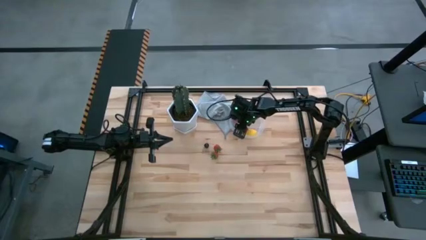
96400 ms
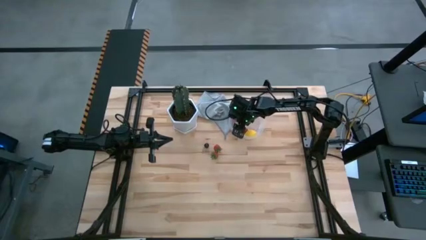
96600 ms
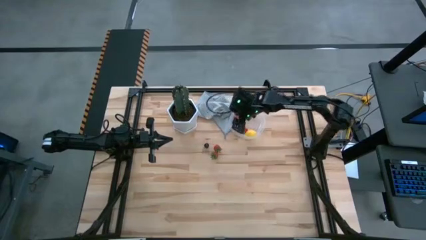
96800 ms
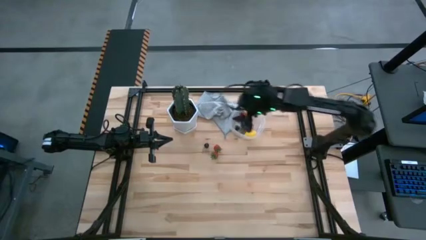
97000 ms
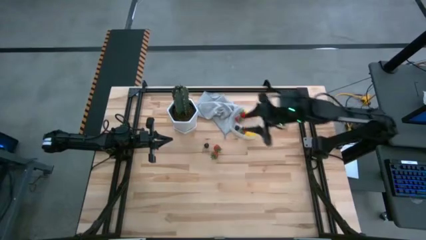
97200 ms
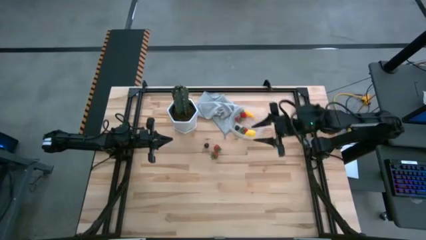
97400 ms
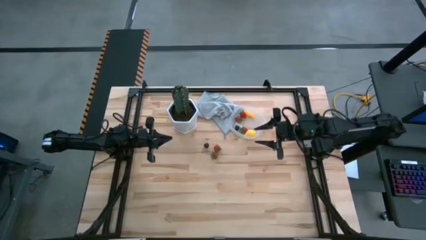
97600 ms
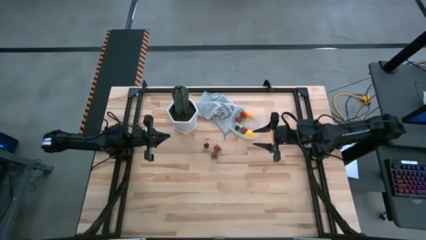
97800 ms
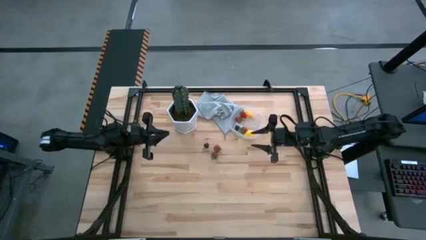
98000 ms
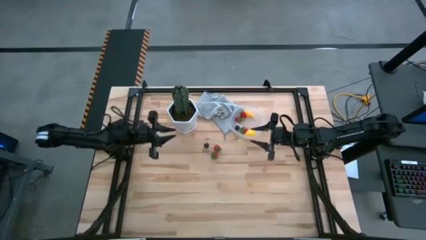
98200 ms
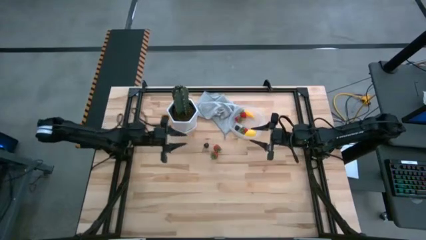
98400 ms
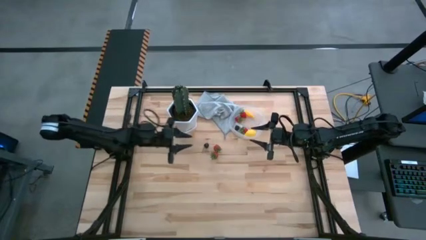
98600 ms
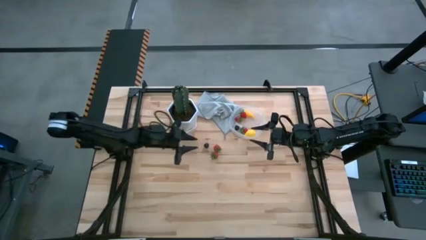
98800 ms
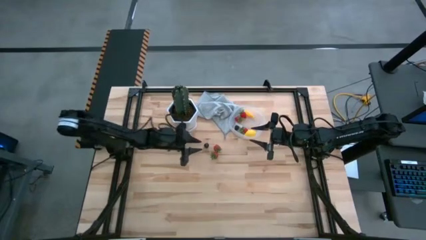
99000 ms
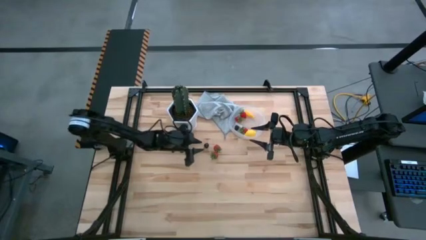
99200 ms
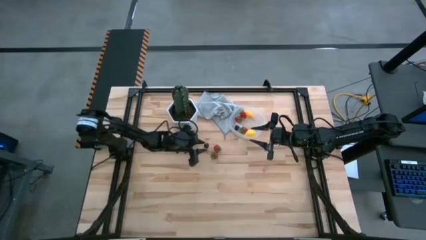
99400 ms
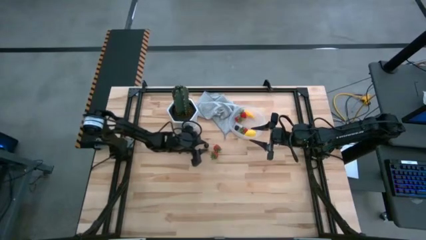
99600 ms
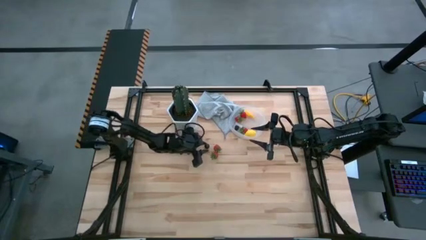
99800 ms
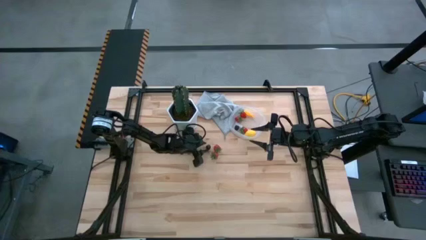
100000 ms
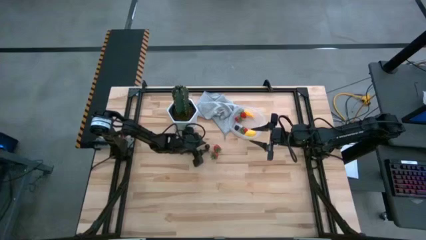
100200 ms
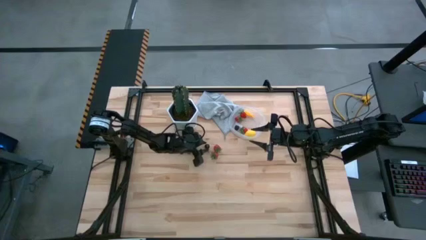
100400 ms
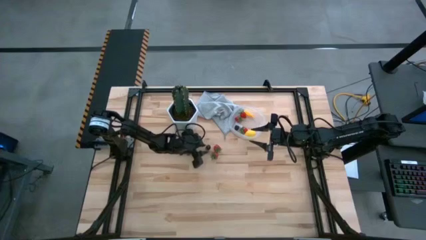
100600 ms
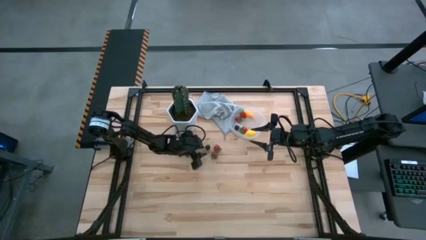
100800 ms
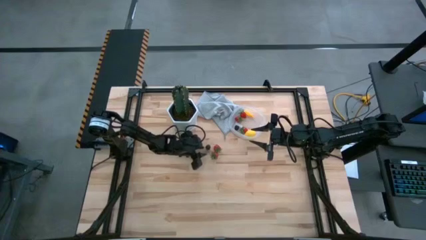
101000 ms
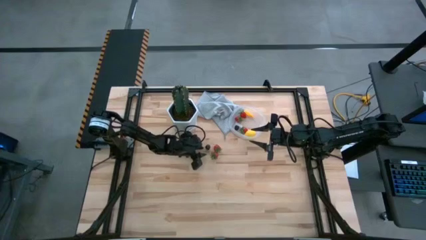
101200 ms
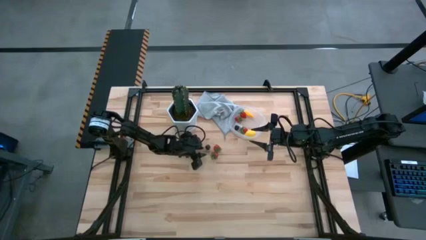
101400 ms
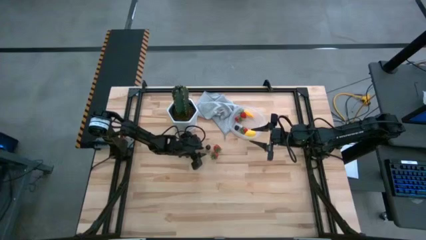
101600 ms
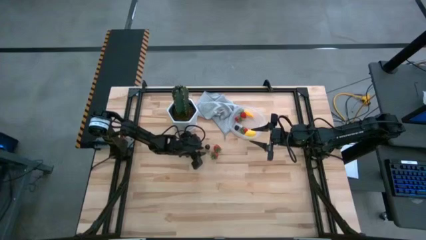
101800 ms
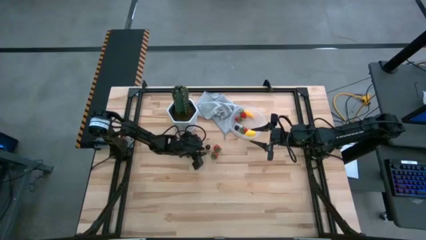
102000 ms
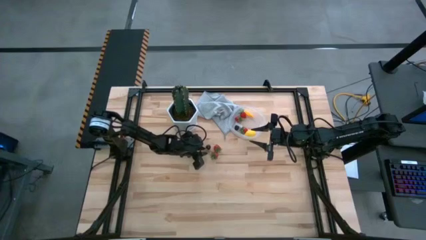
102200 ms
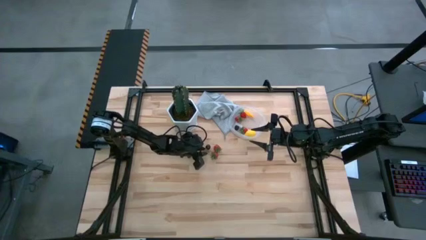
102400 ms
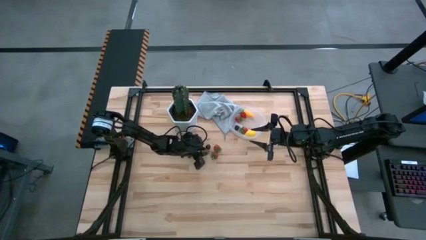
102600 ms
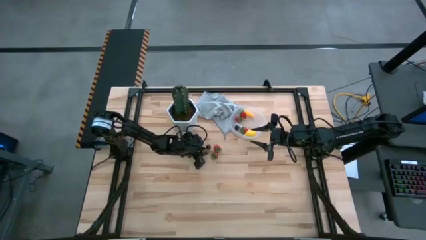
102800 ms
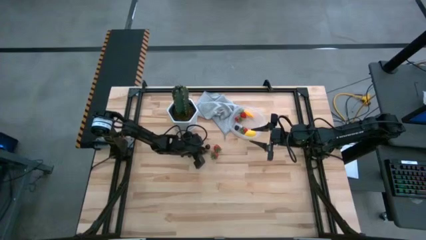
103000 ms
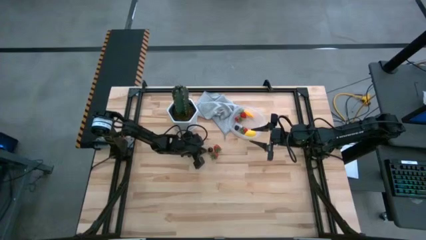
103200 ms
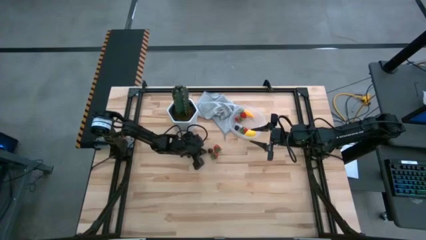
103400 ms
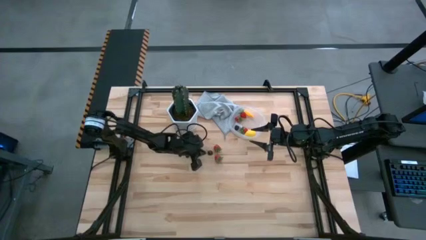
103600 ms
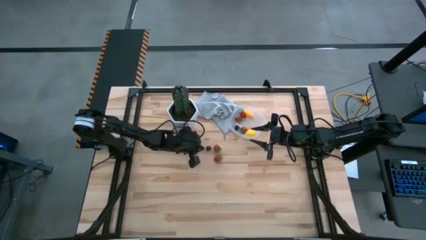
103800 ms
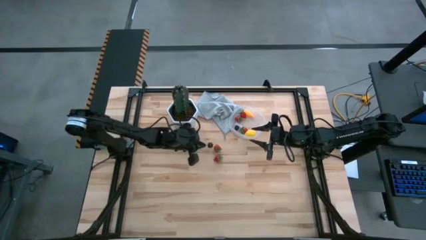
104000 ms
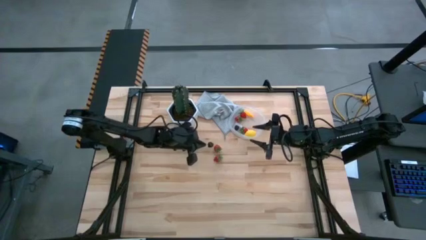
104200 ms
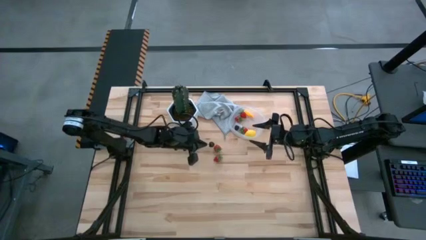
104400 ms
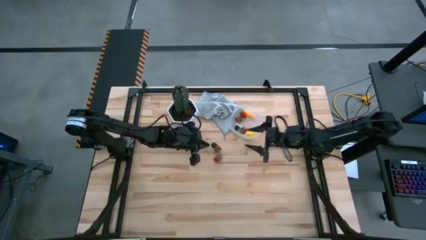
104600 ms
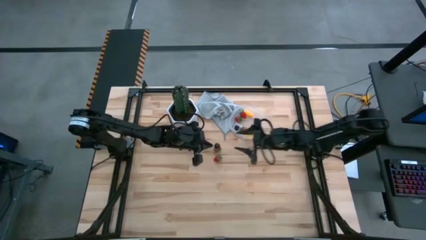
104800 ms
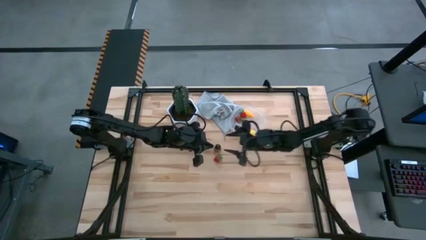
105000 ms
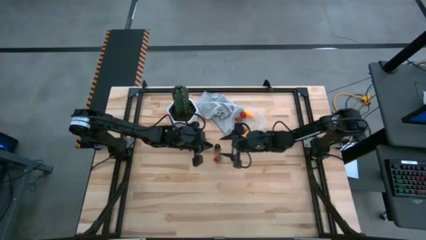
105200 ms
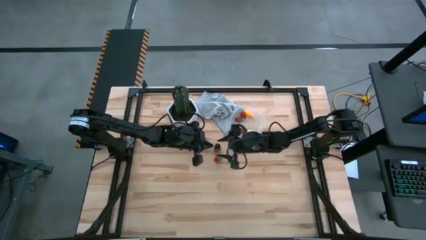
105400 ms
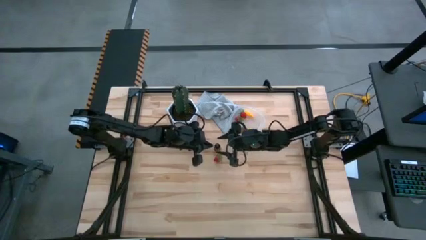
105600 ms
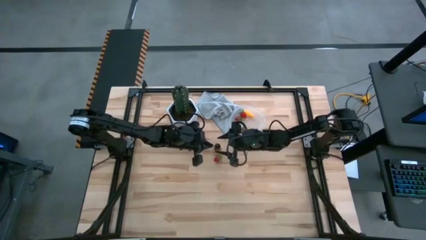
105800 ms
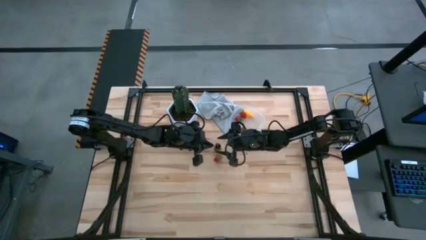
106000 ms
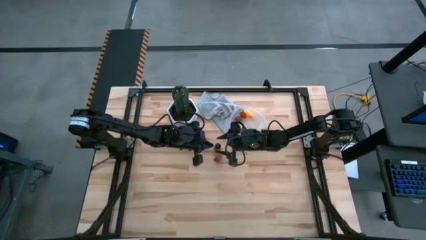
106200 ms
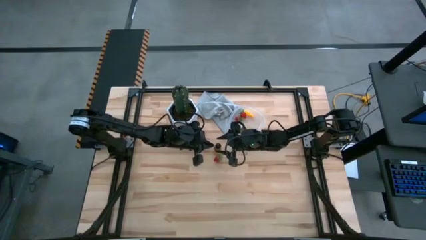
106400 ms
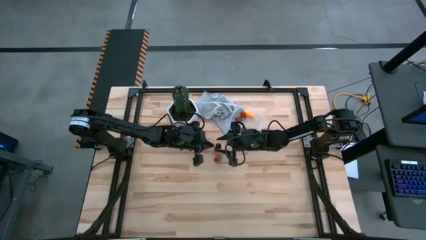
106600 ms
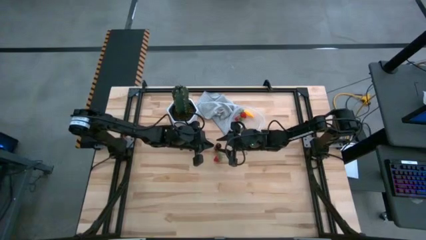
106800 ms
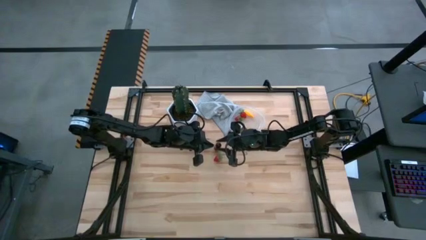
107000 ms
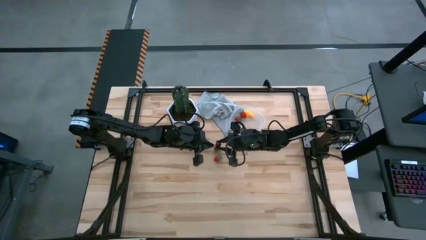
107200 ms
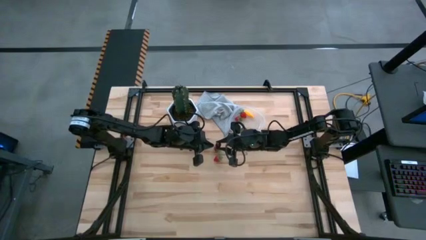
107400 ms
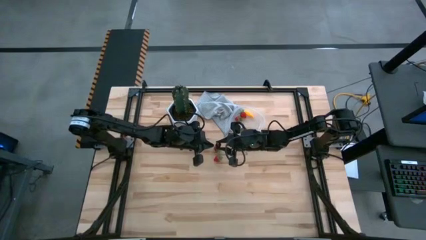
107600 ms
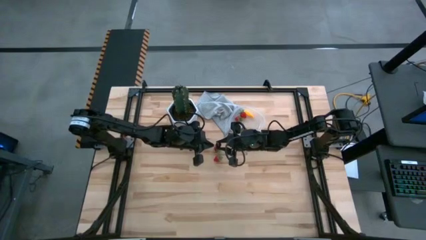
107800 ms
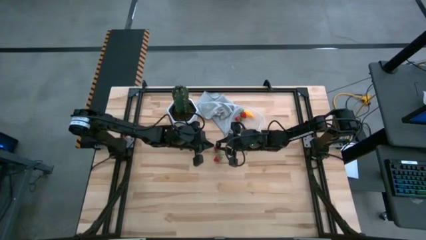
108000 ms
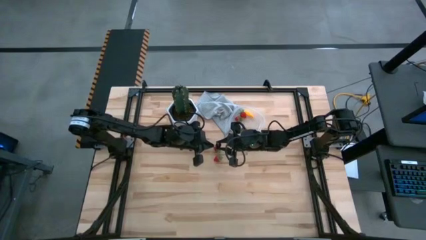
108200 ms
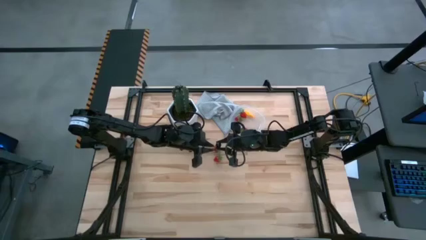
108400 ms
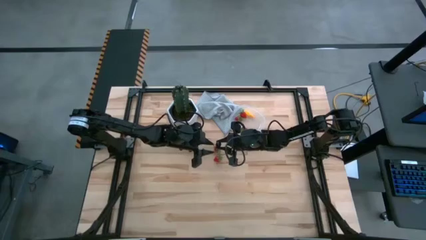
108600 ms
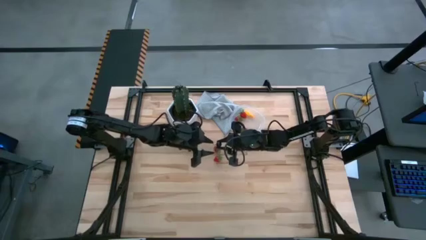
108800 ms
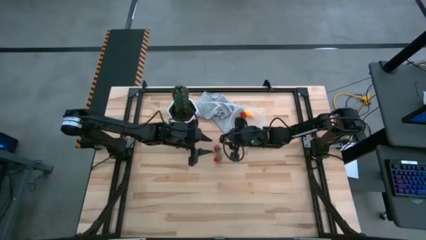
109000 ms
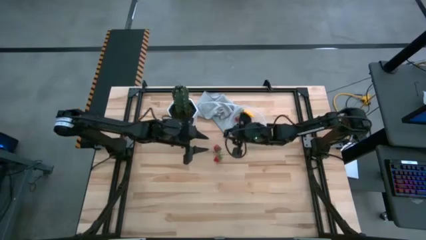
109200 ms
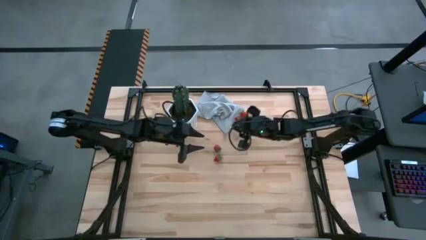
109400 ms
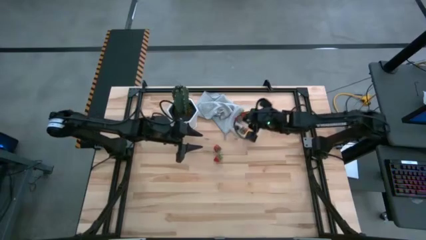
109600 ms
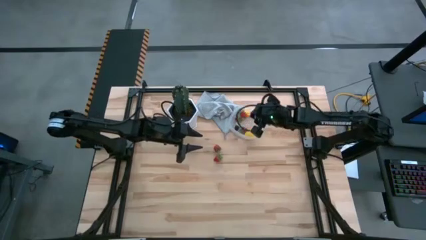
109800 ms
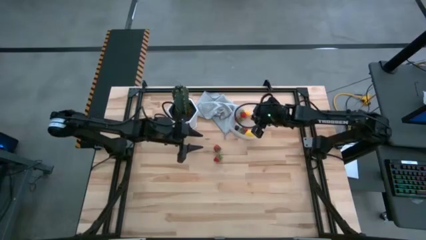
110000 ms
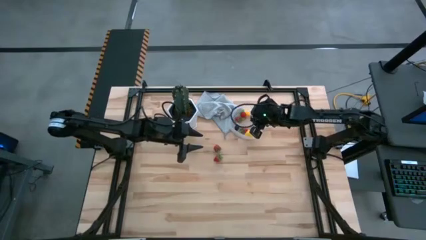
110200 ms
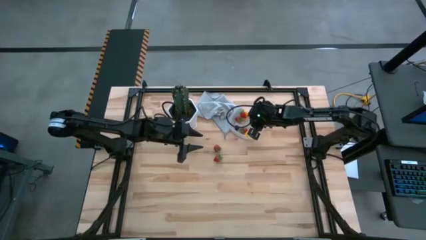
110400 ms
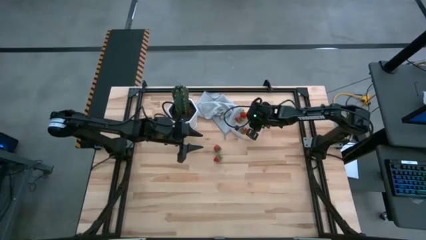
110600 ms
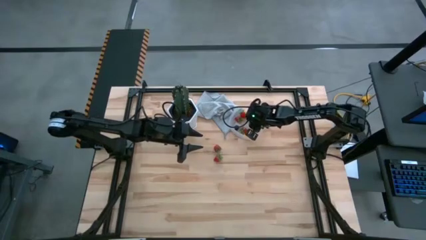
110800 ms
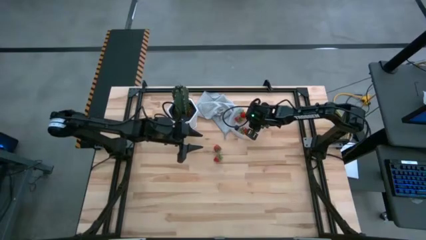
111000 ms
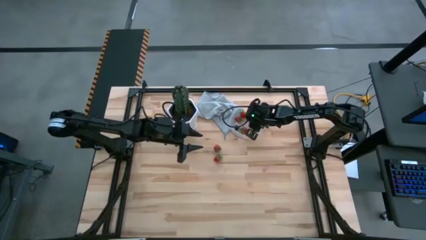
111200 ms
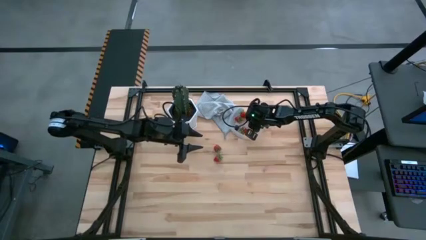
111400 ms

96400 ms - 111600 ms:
Task: Pick and placing Produce into tupperware
Put the black cherry into the transparent bin

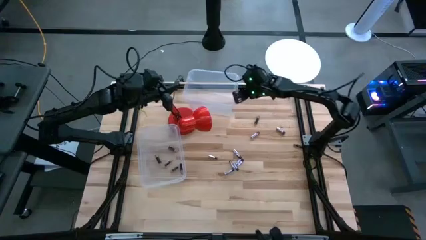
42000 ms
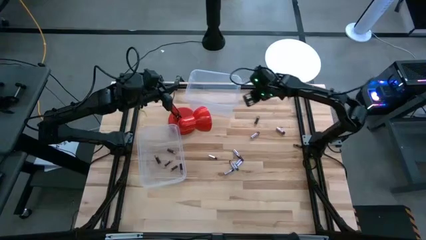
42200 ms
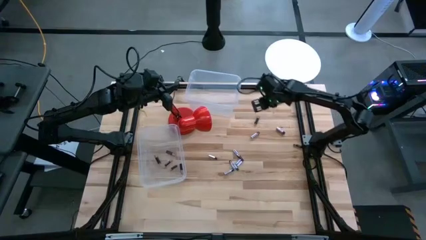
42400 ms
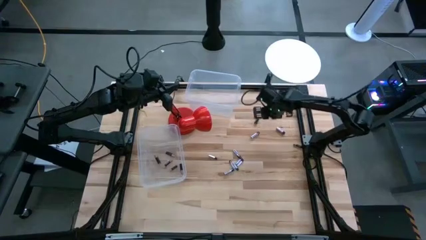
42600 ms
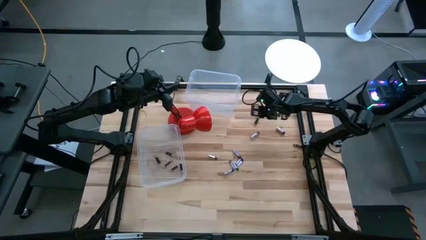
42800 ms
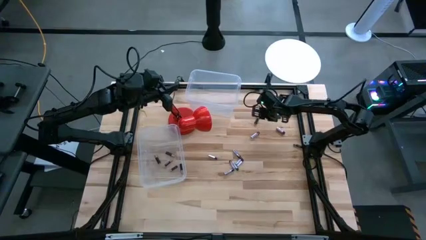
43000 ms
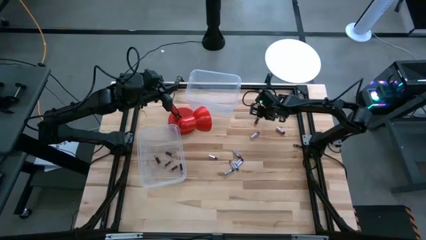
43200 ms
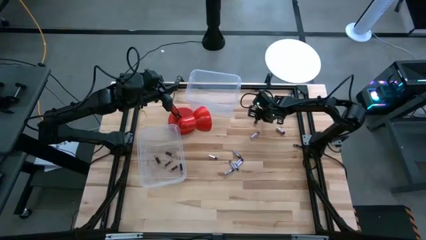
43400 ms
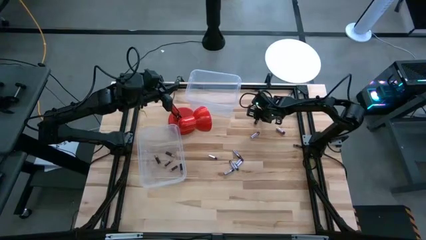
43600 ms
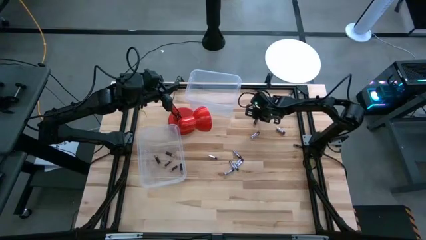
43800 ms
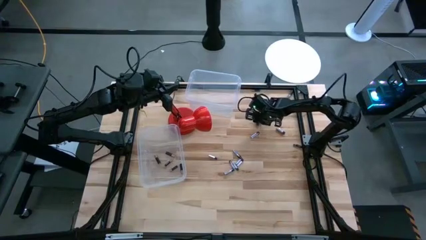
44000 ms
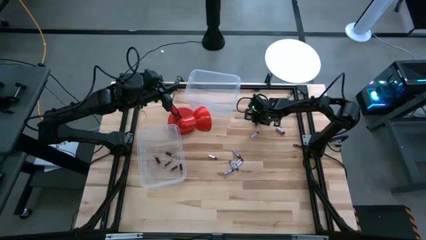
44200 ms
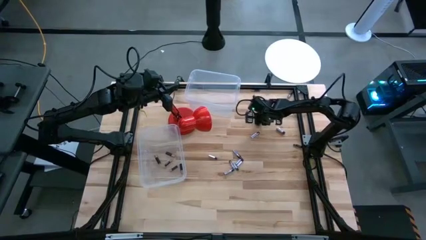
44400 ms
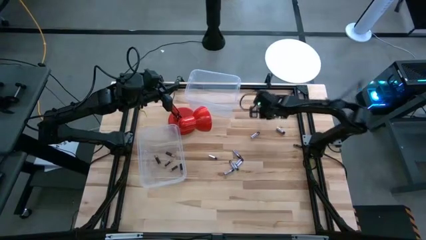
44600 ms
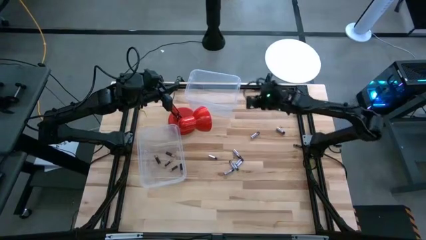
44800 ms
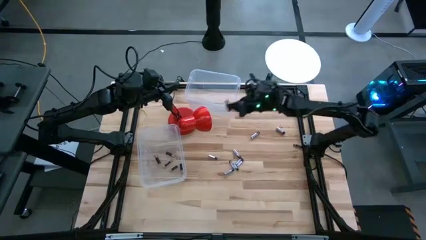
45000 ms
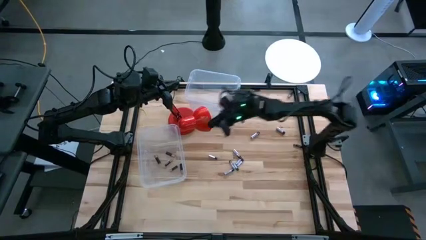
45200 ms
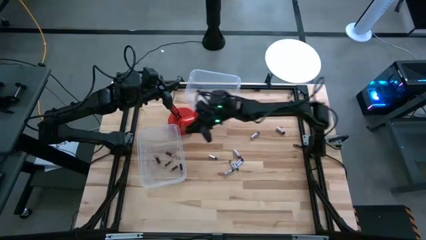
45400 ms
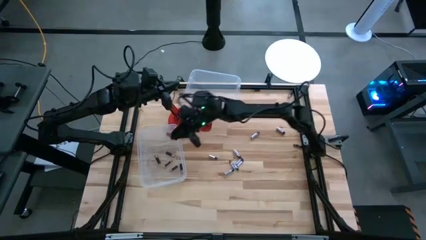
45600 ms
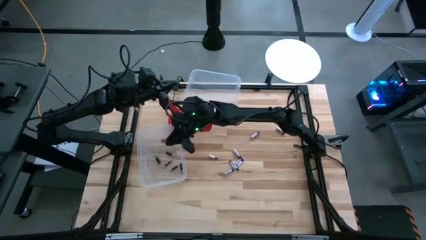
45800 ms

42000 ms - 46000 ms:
Task: Sort batteries
Put the black battery into the bottom transparent bin
